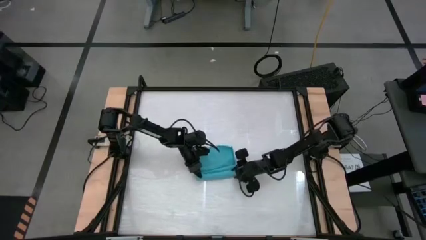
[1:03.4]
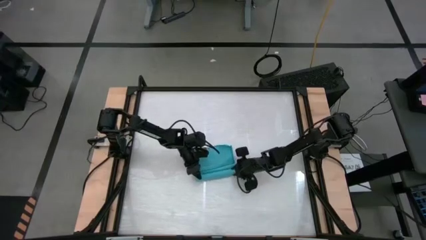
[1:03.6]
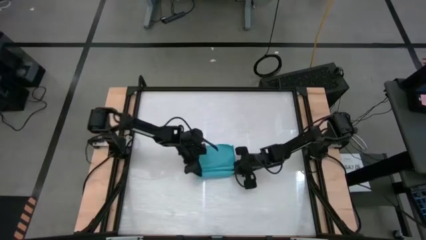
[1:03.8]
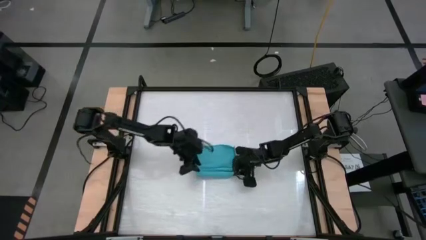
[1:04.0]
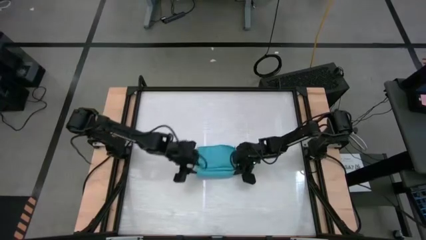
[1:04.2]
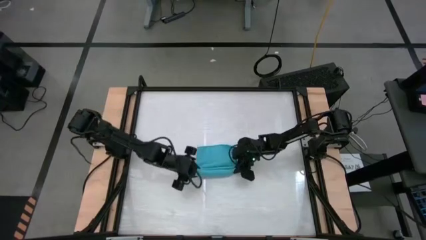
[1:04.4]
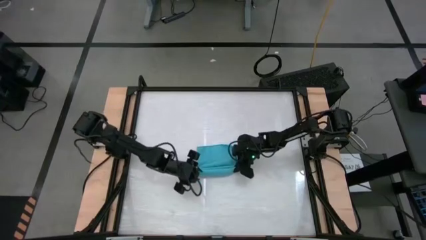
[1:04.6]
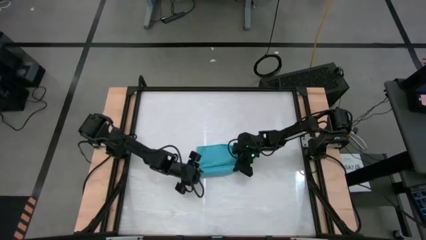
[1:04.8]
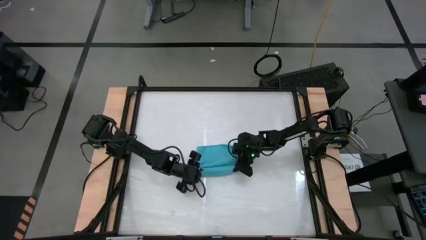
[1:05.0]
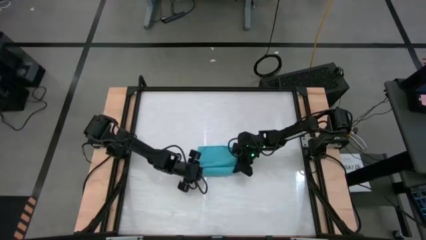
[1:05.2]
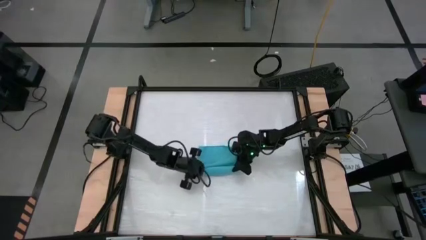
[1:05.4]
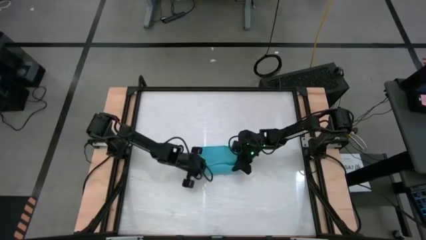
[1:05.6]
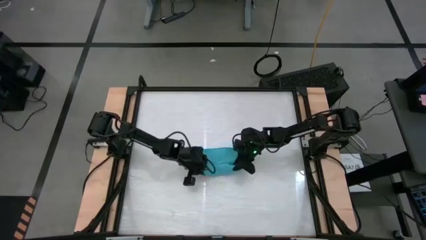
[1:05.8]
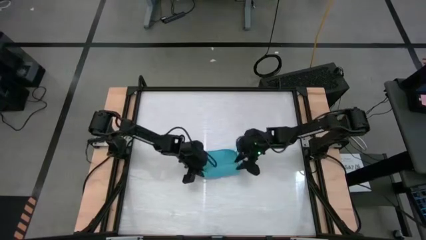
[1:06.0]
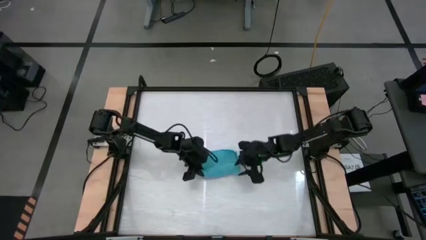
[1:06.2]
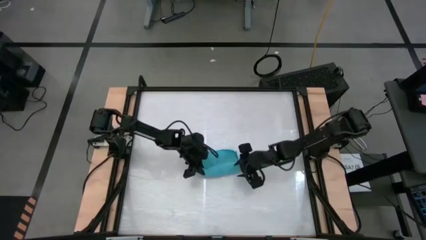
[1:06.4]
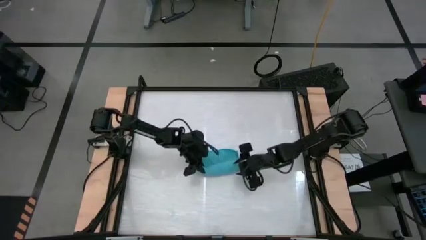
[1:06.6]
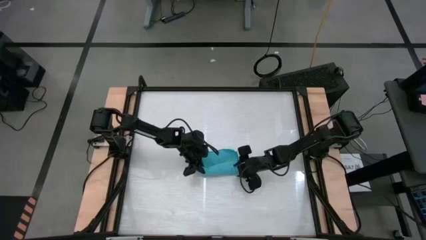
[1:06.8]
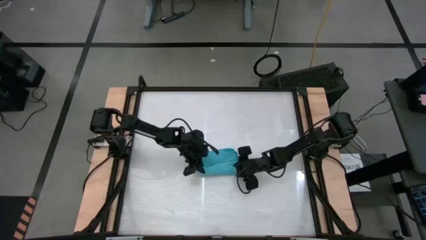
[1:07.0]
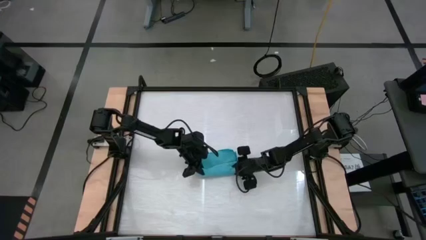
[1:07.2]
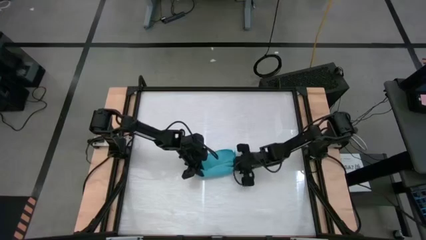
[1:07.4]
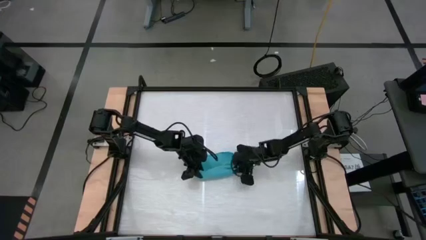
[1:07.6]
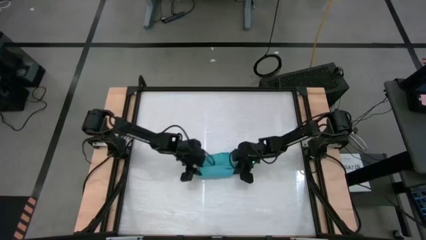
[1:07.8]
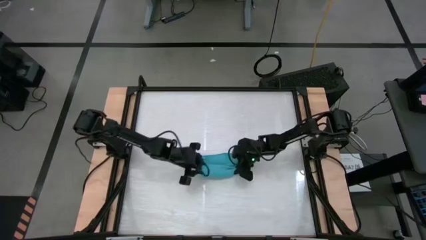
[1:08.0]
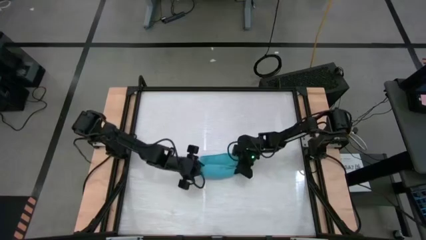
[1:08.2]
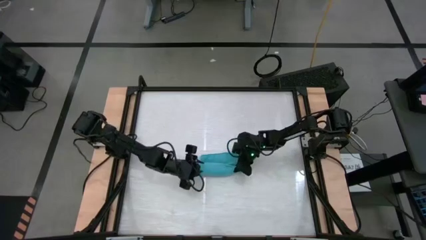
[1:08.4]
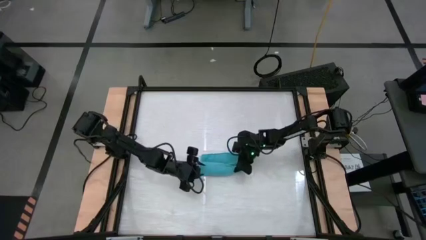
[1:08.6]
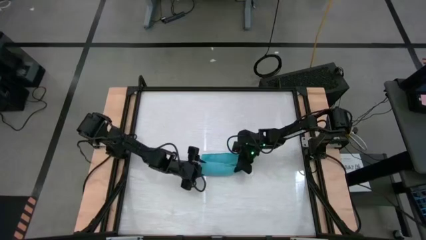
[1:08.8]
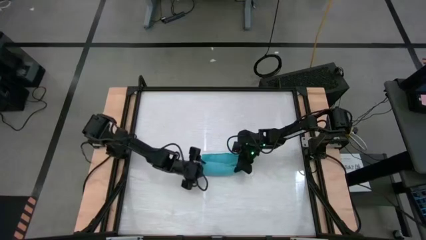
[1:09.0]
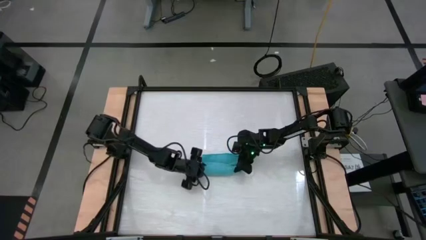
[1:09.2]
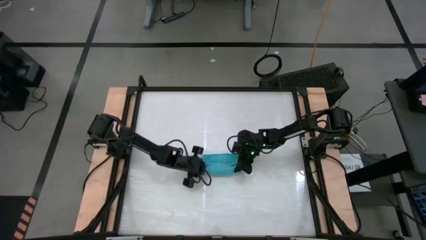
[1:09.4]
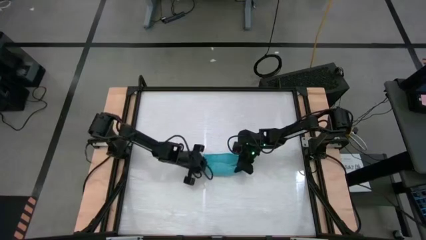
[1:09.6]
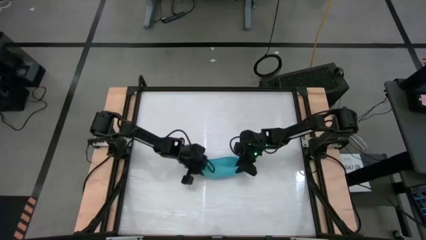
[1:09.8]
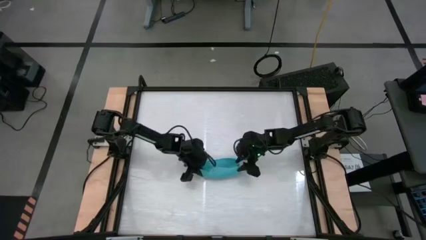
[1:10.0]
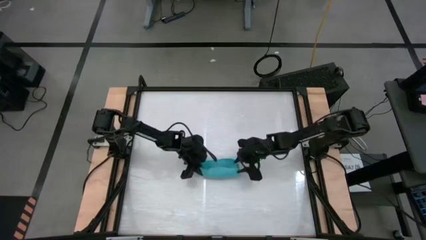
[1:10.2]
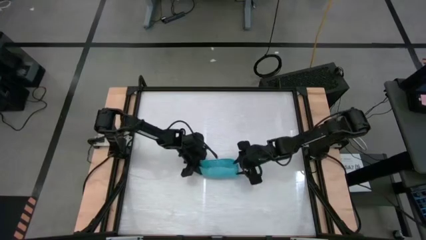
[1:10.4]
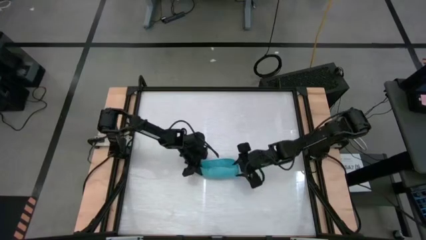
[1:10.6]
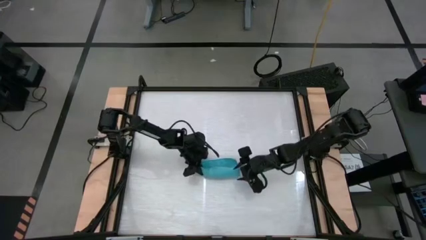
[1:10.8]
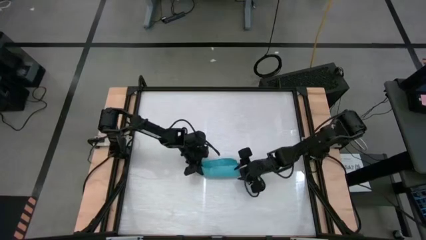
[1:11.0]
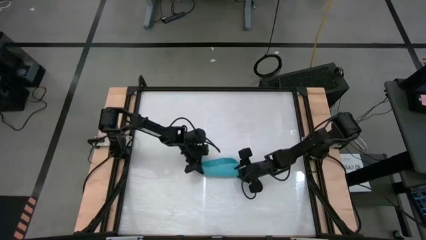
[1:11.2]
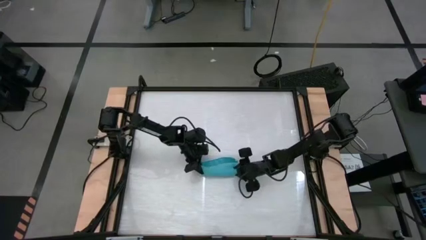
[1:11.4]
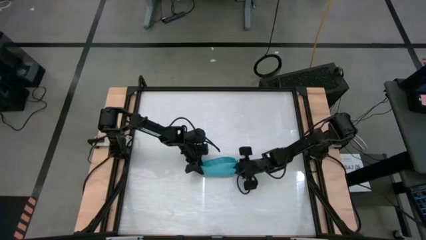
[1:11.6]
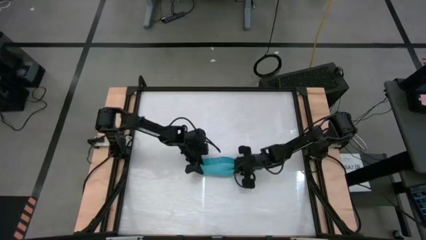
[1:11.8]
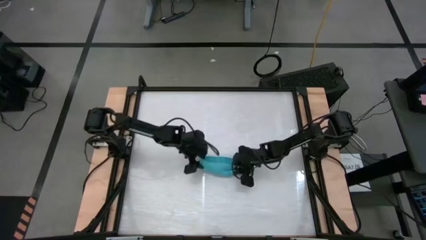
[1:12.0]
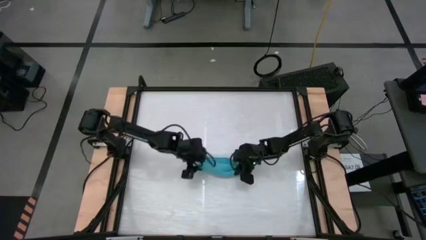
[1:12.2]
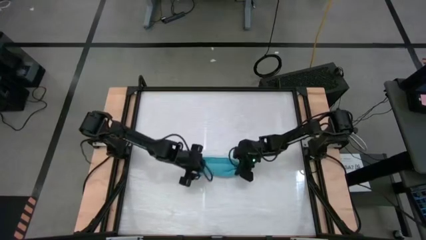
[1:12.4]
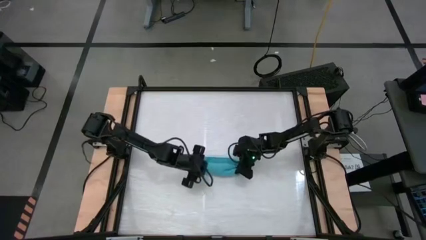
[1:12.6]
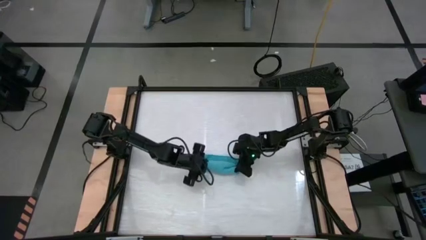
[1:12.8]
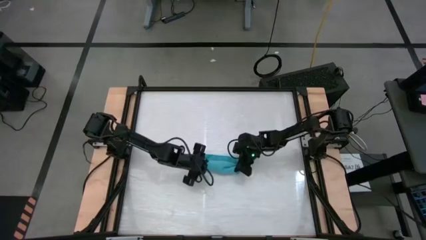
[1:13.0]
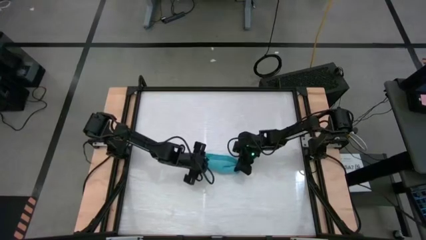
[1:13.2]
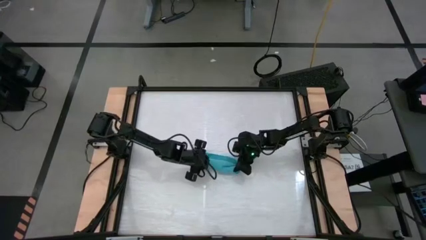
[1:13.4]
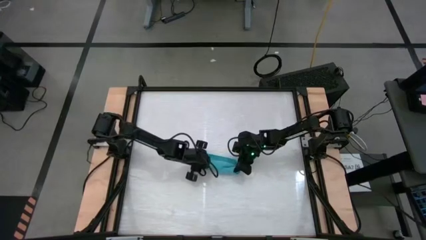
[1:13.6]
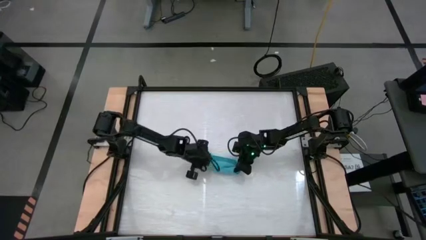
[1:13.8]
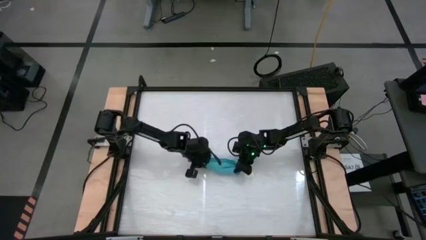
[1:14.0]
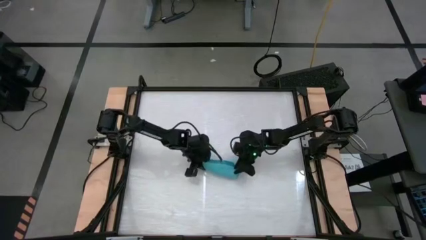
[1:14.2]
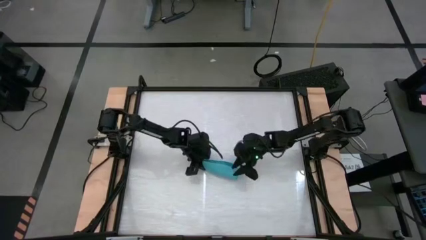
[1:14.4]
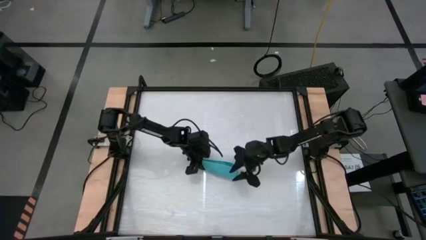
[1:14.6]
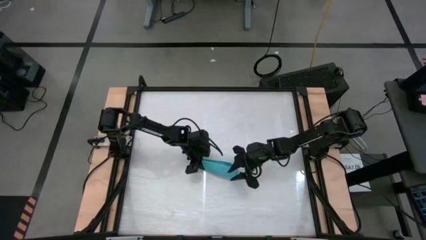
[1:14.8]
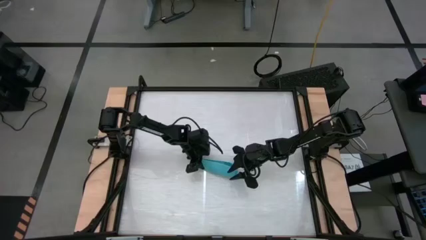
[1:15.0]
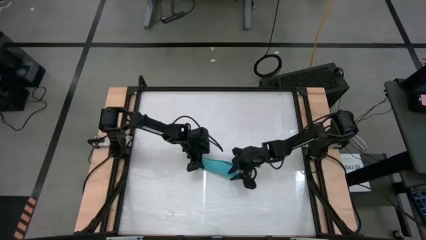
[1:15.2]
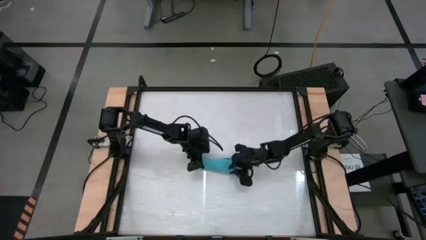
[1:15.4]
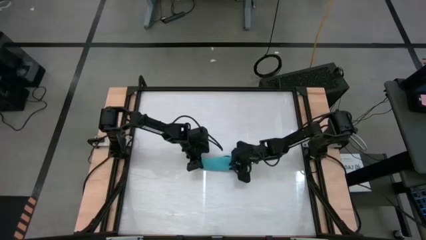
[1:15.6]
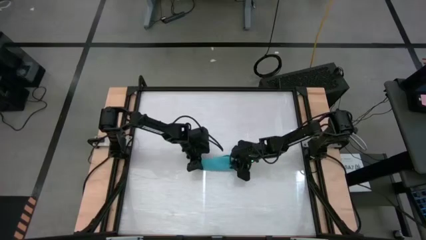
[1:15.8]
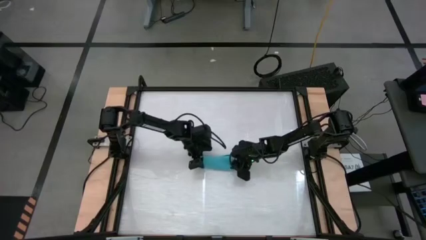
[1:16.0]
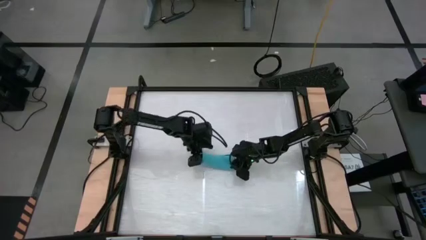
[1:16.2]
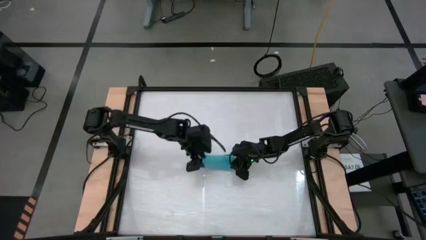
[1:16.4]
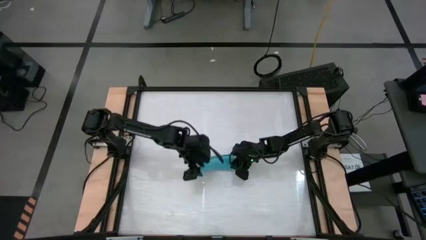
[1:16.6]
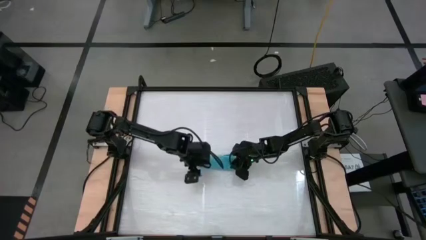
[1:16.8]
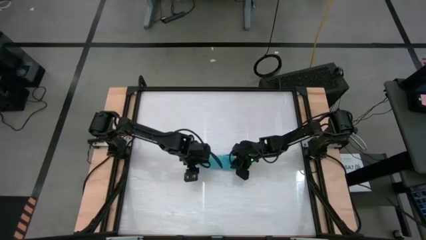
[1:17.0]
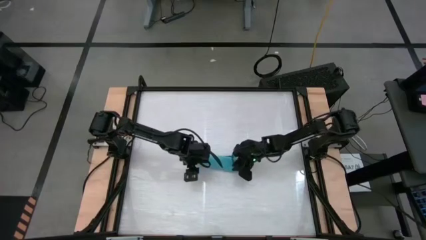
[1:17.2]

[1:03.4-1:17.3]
Task: Roll towel
Roll the light blue towel
